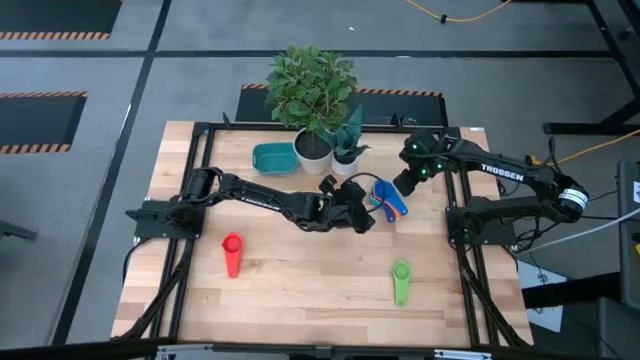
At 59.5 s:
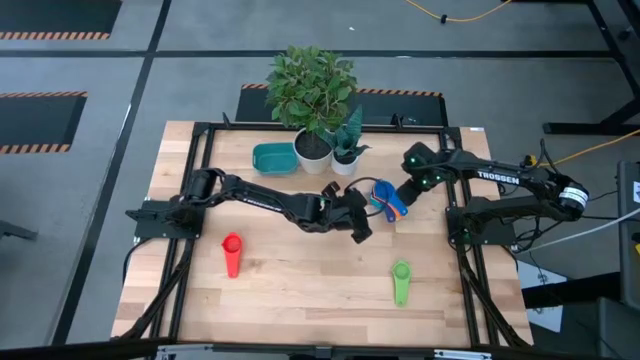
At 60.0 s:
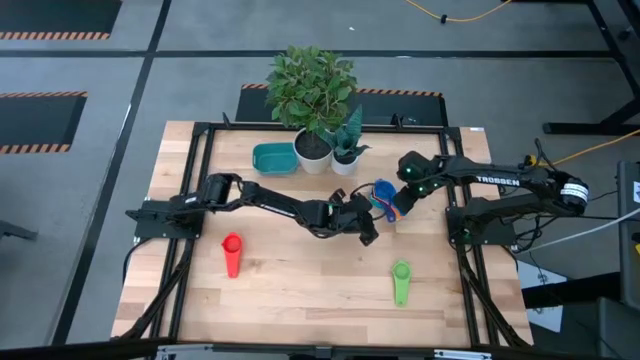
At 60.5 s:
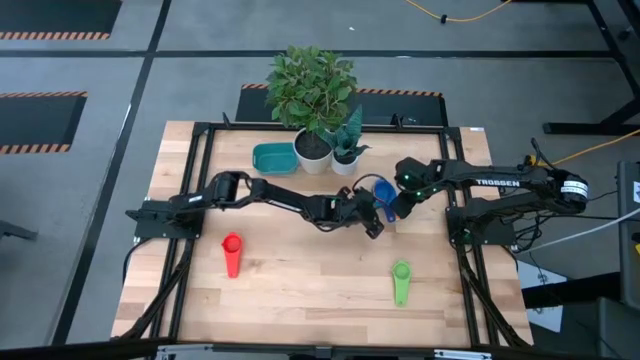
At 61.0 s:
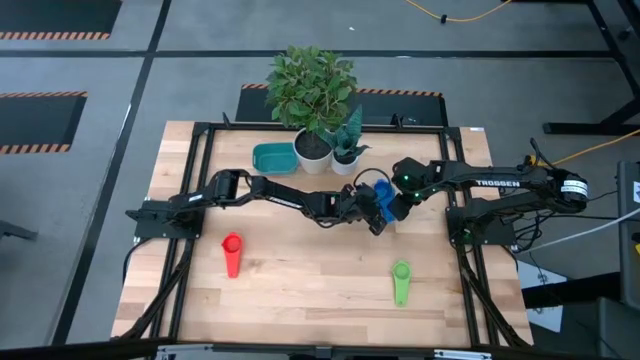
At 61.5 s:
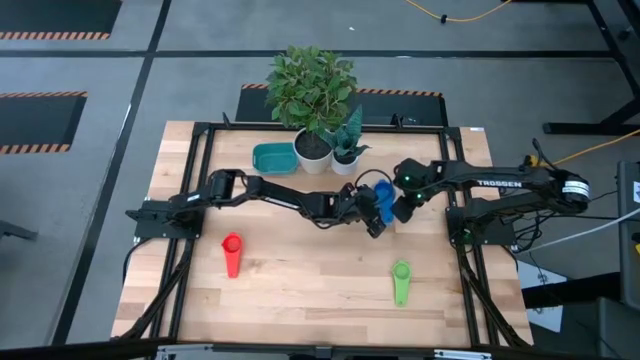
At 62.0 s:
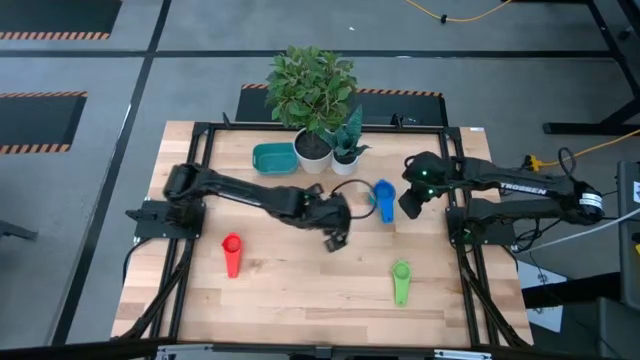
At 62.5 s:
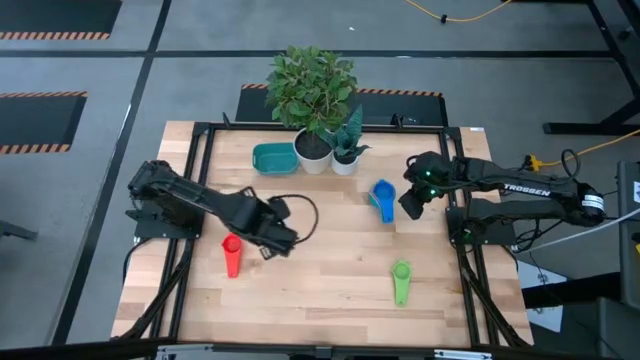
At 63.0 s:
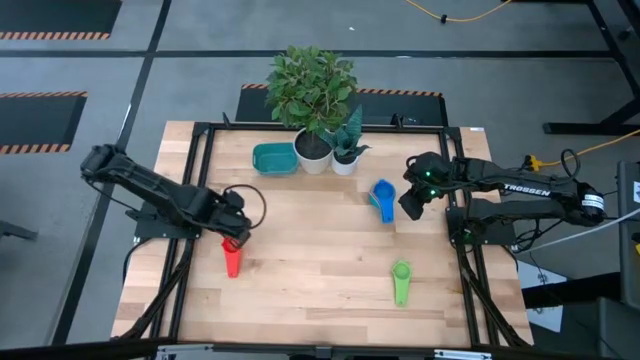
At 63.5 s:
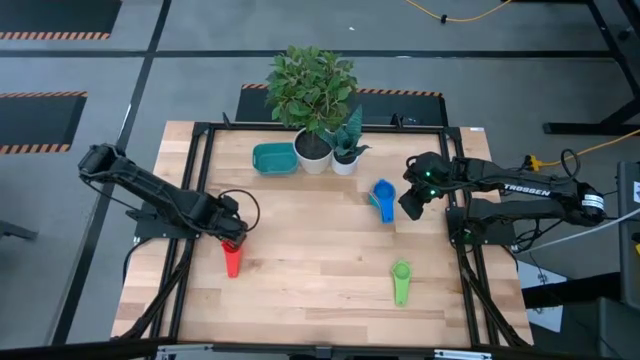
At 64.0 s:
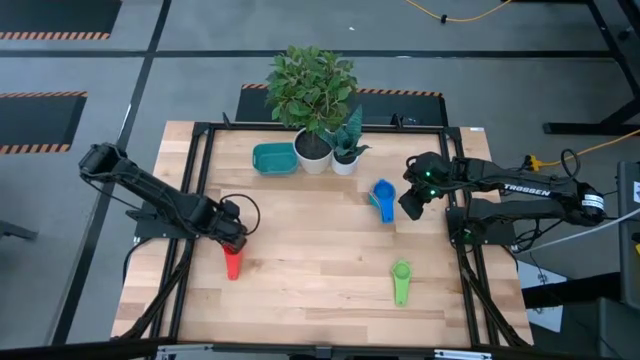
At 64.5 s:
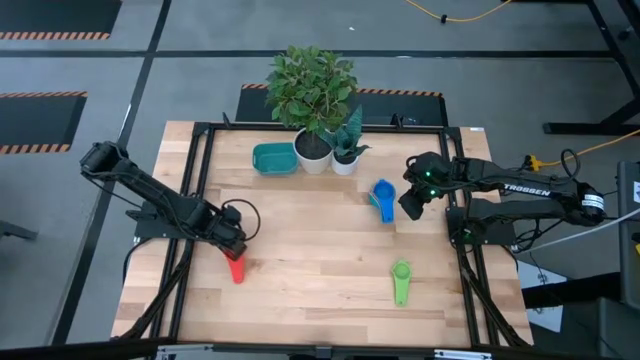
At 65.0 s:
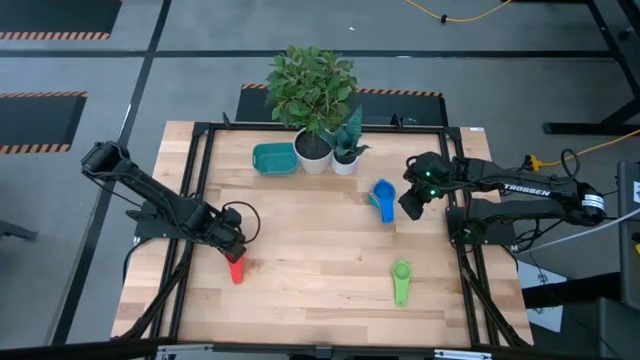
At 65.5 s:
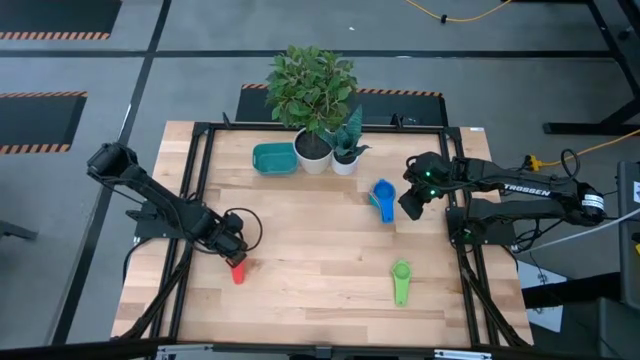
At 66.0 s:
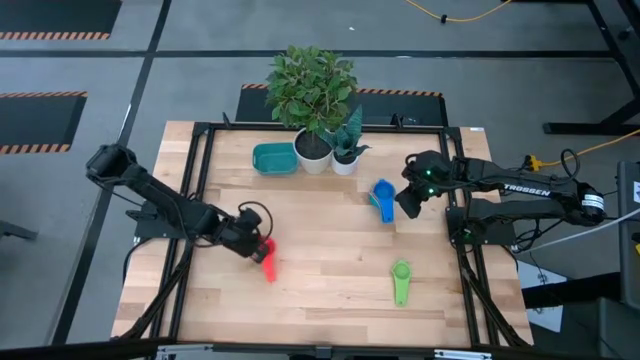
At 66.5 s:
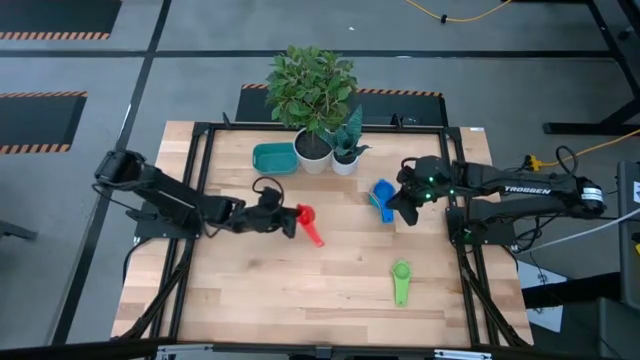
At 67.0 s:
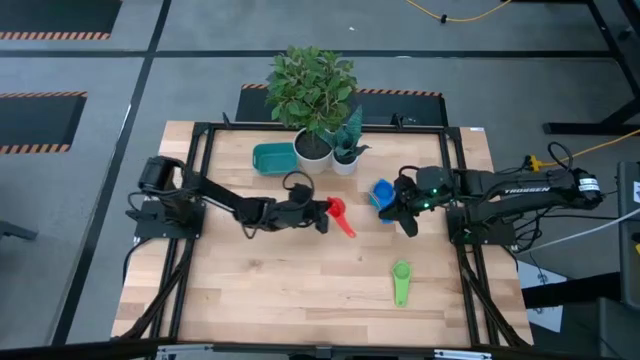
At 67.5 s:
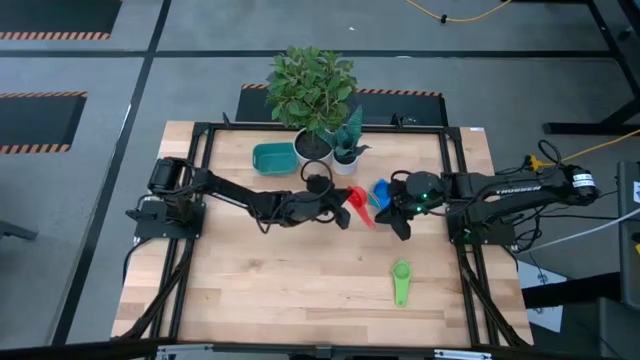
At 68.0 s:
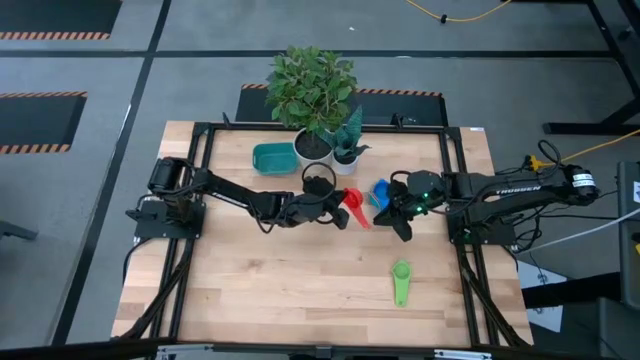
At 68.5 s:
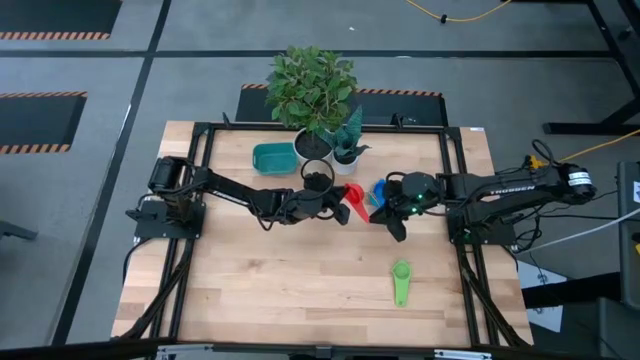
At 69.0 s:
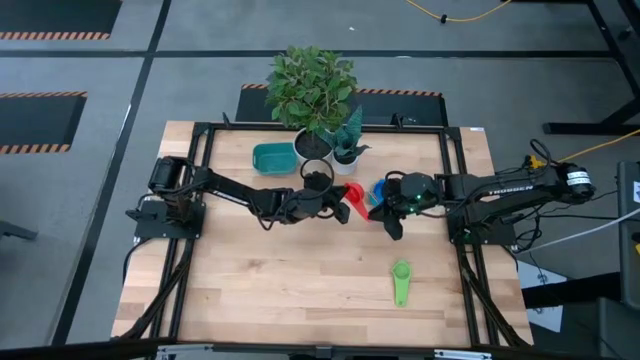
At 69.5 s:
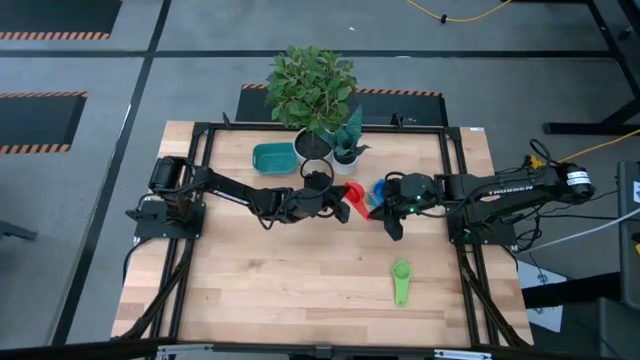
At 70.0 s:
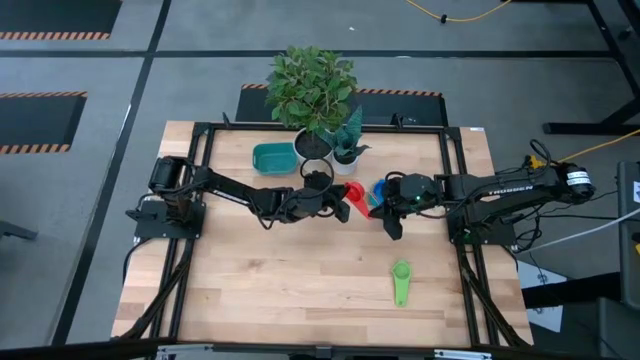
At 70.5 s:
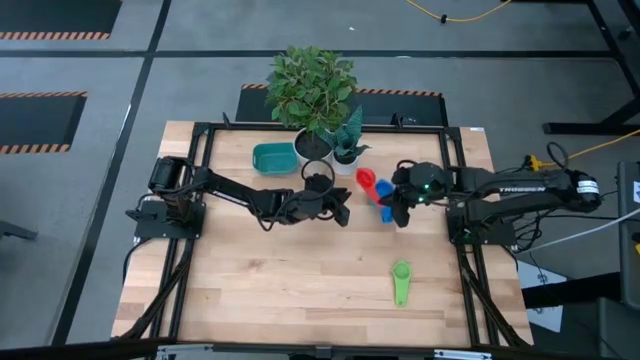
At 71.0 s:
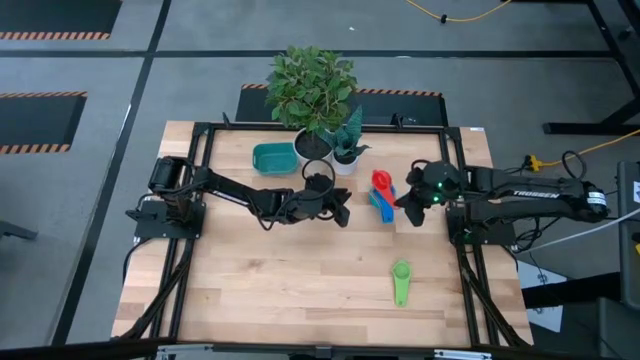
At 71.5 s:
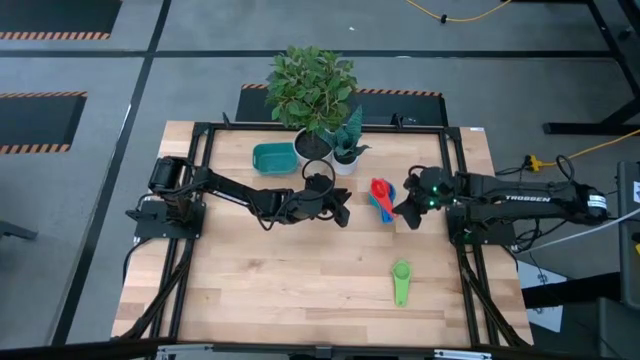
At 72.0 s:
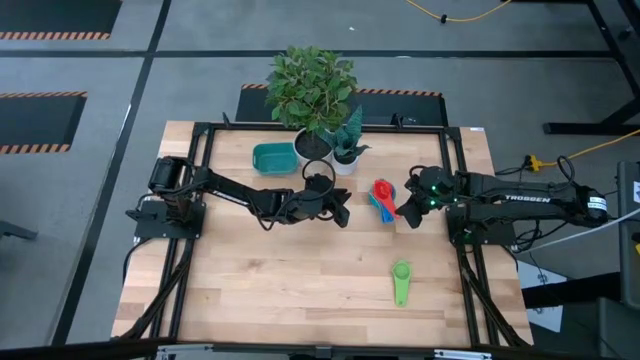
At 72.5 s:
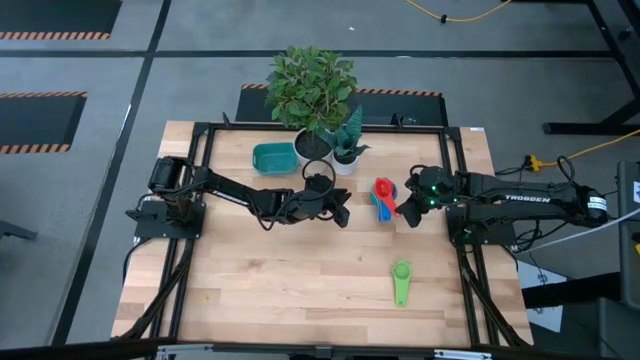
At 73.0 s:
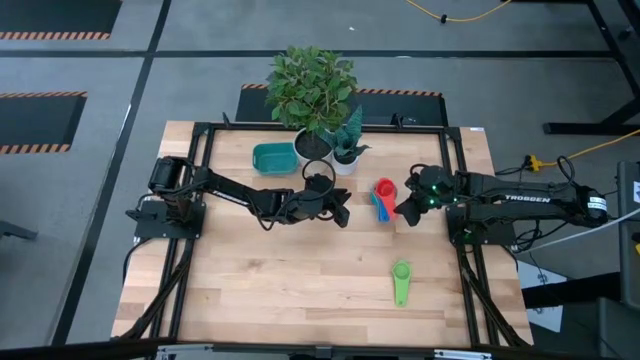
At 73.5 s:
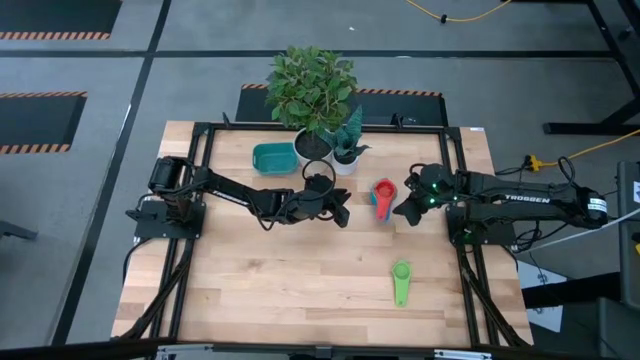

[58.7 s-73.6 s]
Task: Nest measuring cups in basket
Stack the red measuring cup on top of the light blue measuring cup

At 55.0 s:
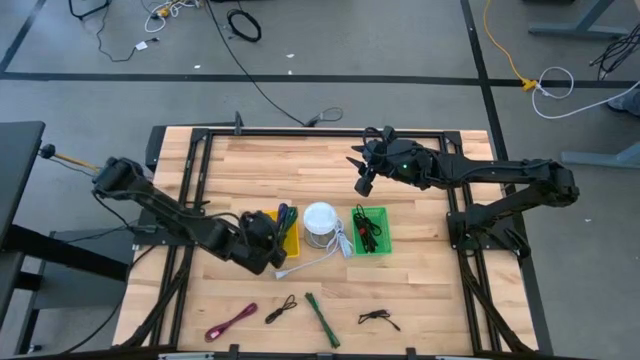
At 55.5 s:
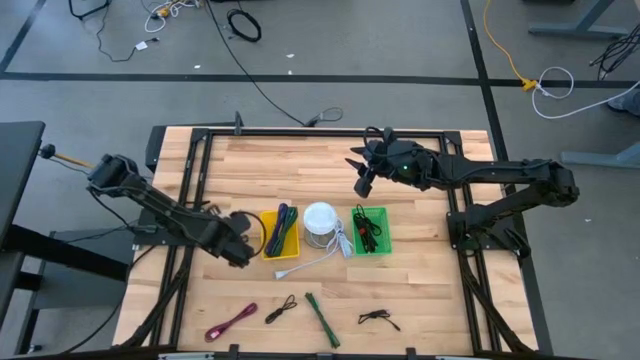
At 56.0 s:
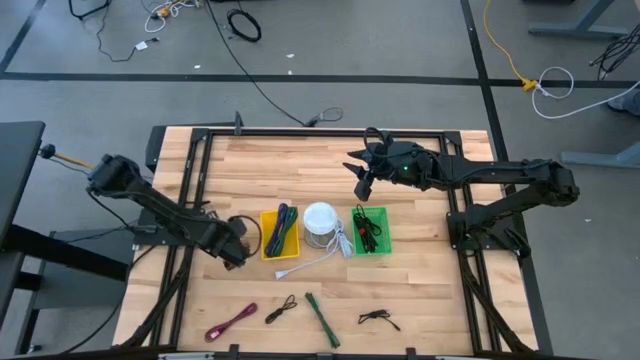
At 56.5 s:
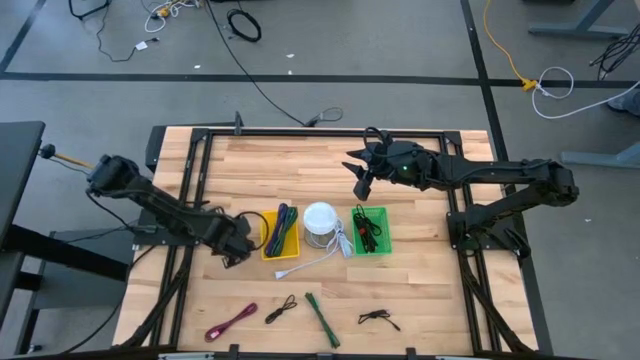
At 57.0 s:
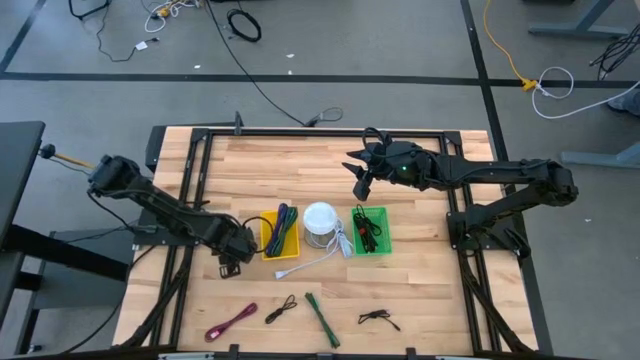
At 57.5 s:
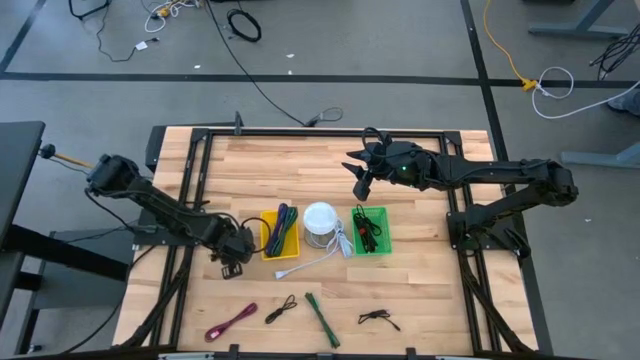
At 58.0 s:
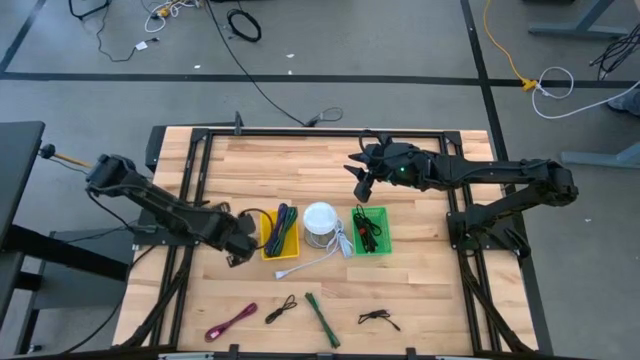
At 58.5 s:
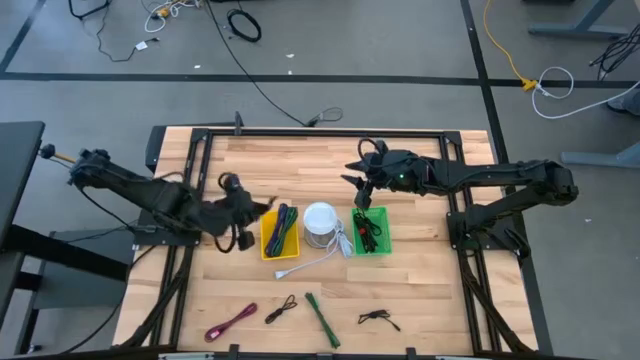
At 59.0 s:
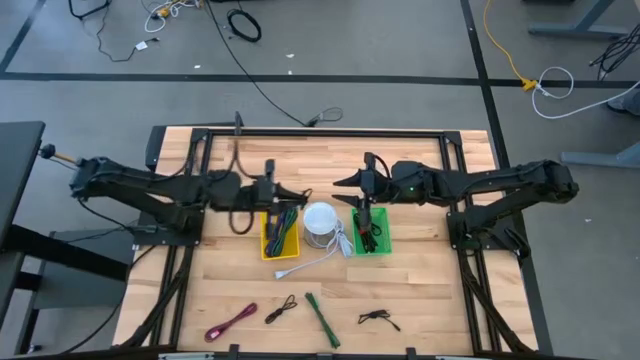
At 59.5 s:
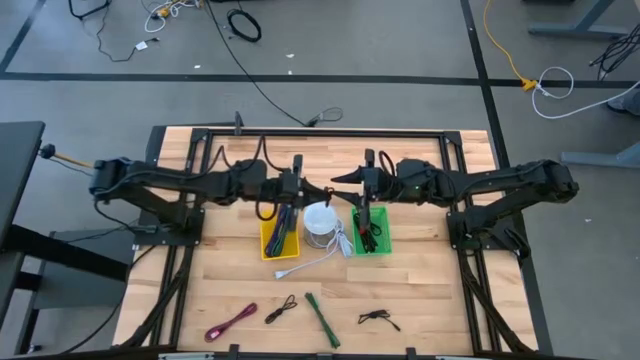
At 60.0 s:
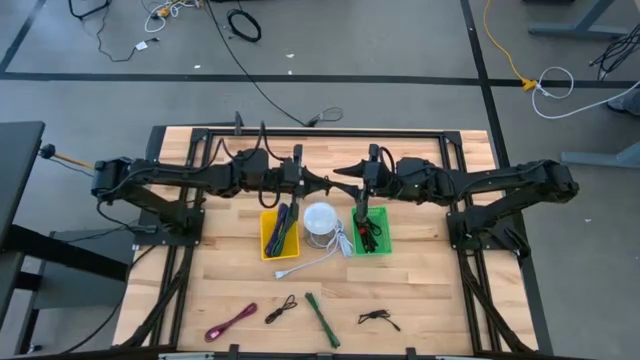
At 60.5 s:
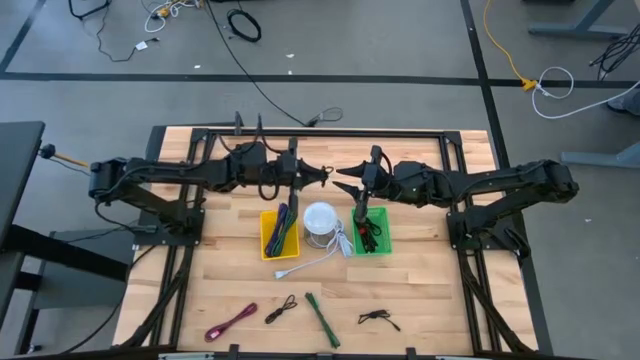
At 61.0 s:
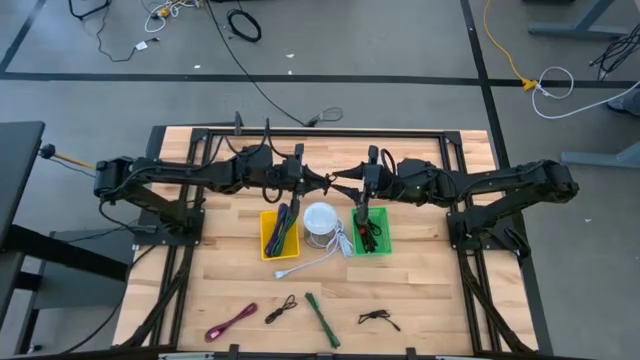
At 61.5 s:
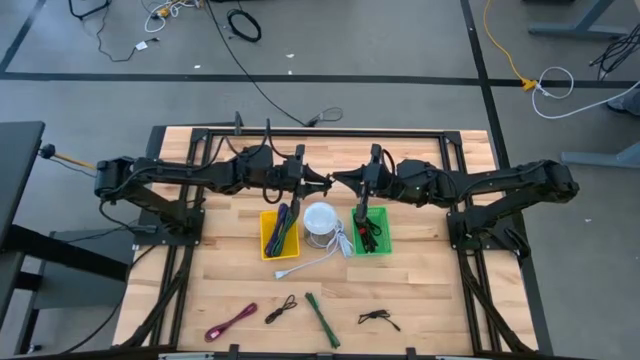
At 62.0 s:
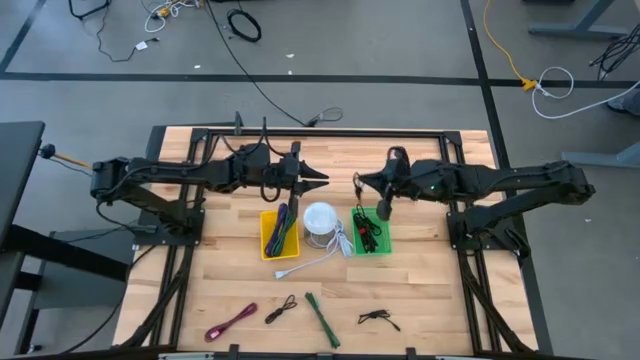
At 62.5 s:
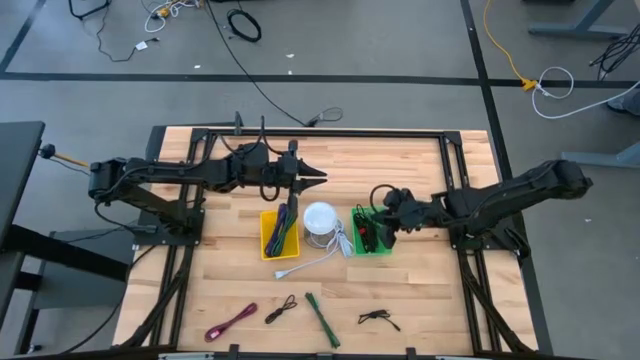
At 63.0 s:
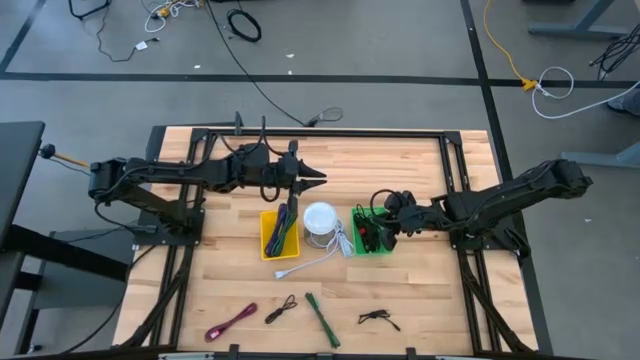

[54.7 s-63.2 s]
Task: Pick & Place USB Port
Put the black charger cable into the green basket
